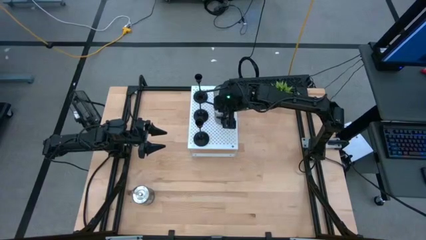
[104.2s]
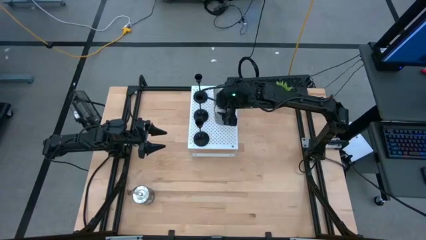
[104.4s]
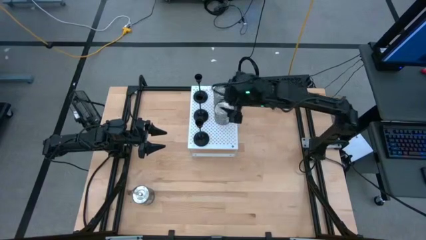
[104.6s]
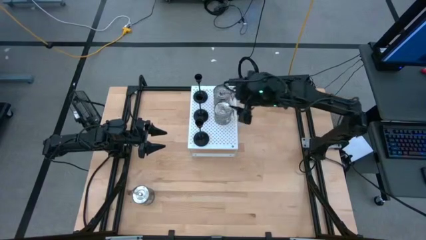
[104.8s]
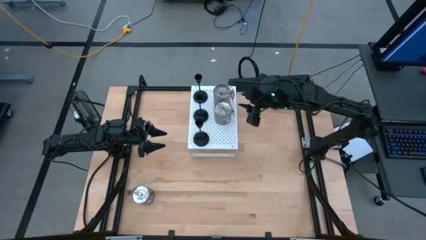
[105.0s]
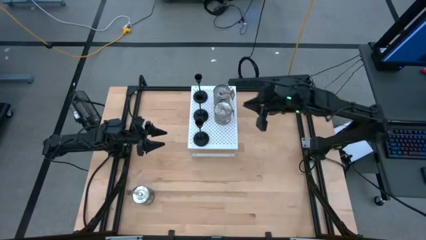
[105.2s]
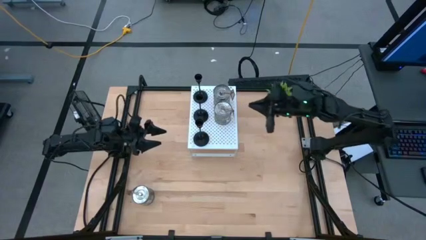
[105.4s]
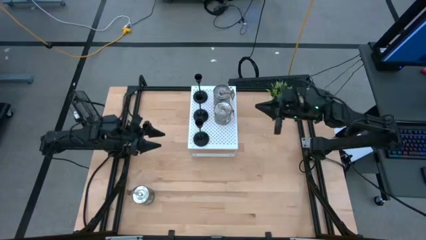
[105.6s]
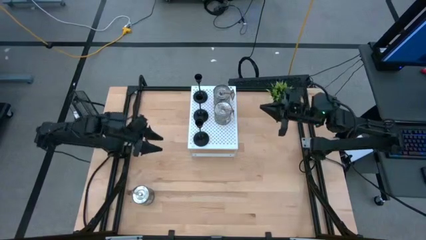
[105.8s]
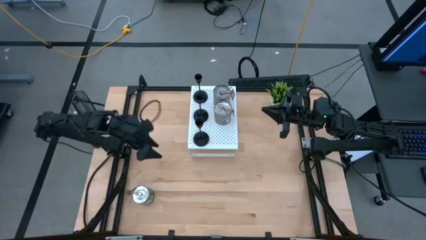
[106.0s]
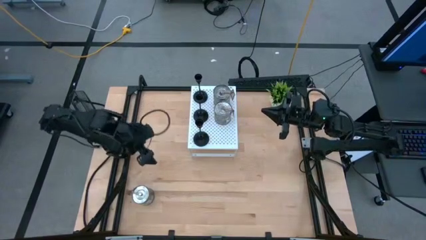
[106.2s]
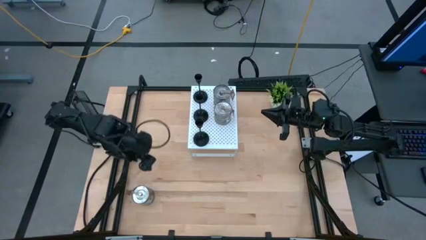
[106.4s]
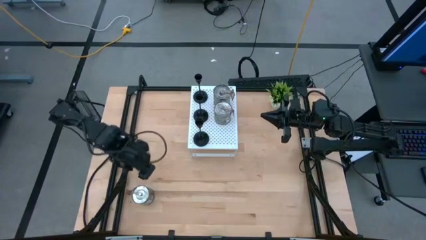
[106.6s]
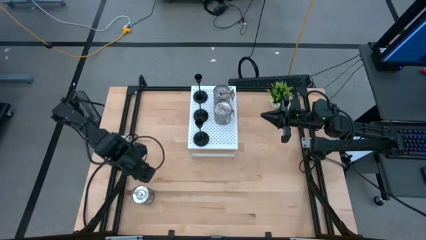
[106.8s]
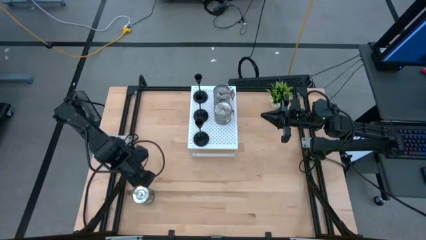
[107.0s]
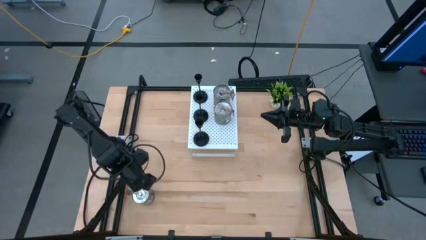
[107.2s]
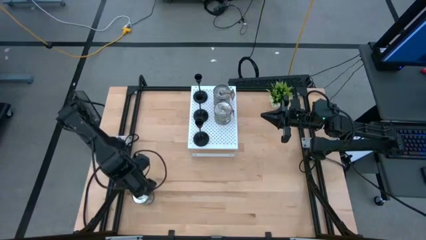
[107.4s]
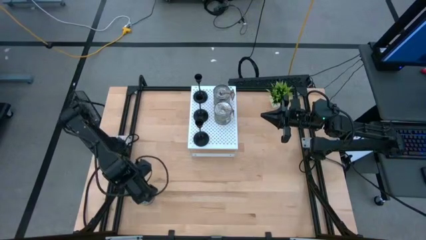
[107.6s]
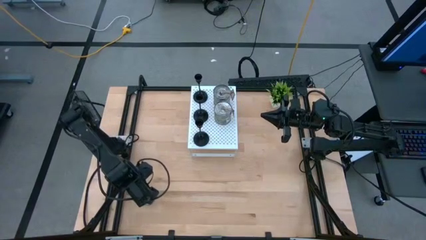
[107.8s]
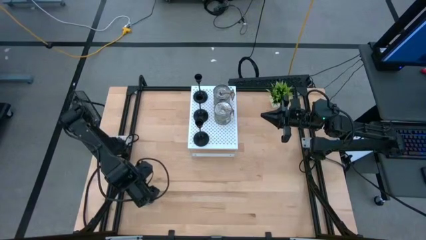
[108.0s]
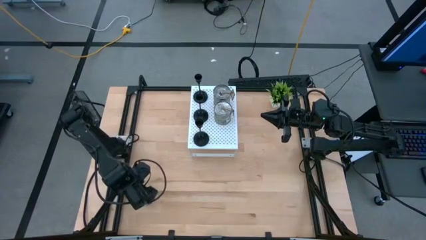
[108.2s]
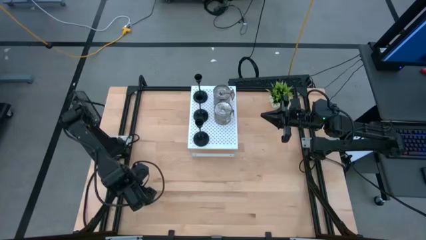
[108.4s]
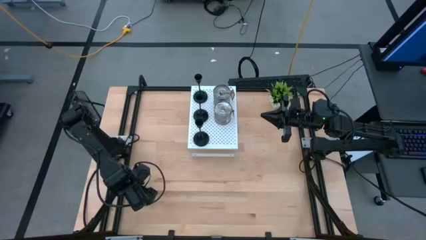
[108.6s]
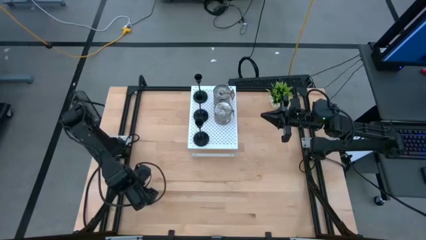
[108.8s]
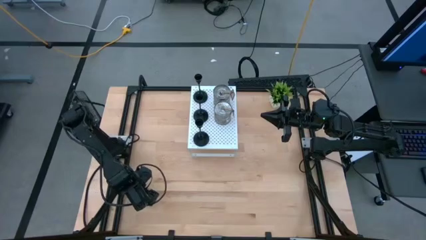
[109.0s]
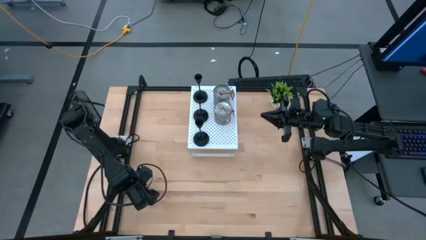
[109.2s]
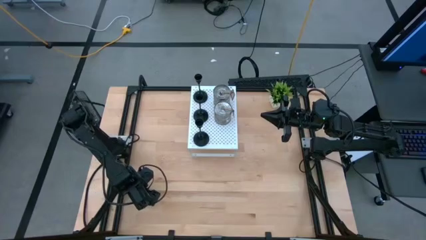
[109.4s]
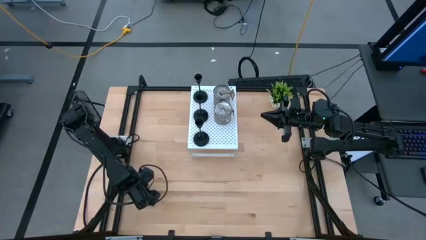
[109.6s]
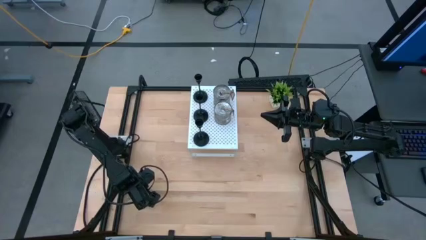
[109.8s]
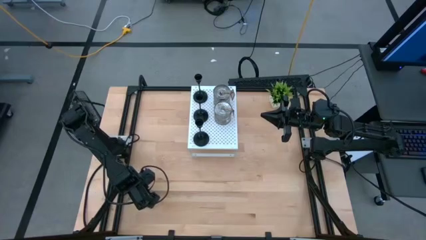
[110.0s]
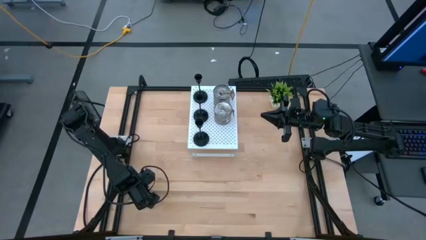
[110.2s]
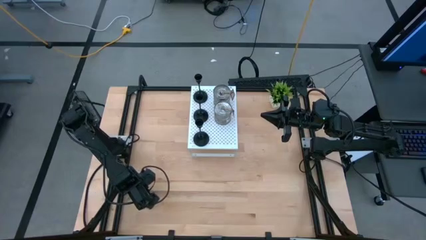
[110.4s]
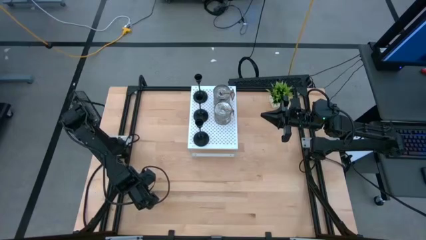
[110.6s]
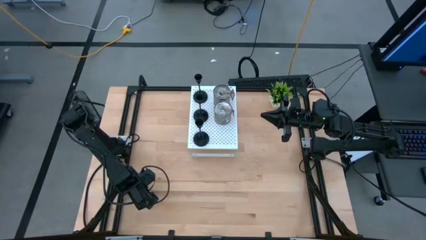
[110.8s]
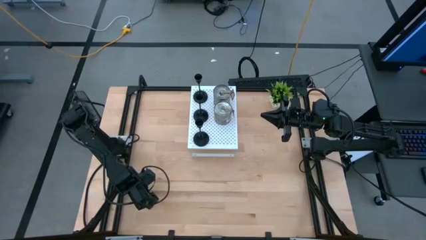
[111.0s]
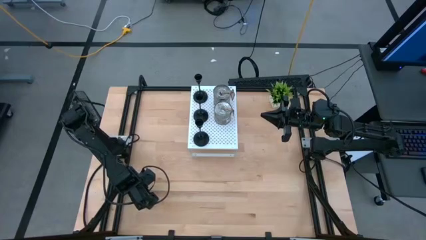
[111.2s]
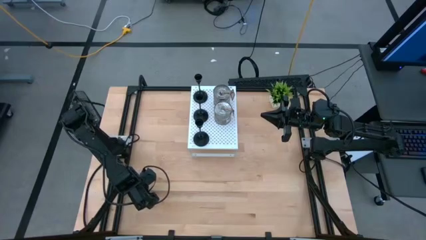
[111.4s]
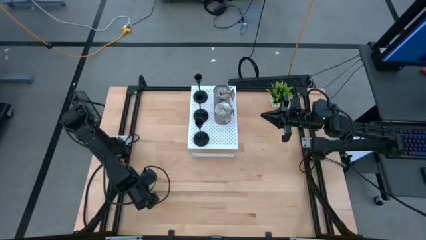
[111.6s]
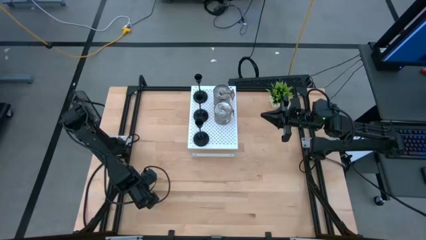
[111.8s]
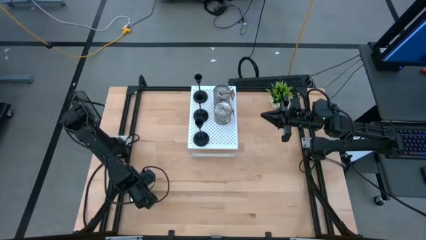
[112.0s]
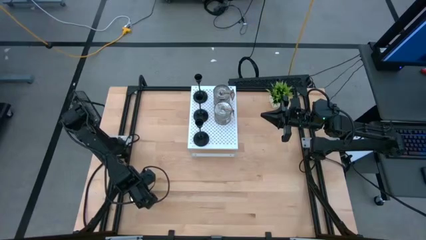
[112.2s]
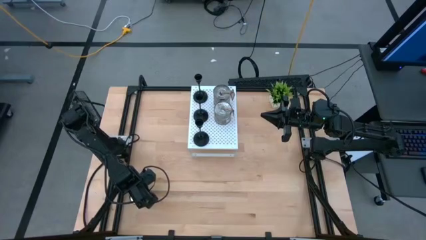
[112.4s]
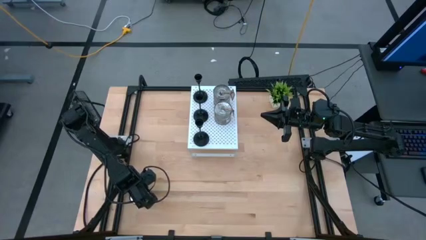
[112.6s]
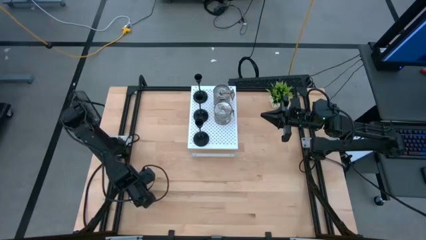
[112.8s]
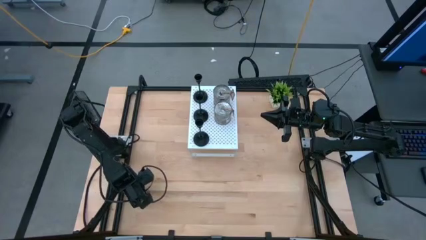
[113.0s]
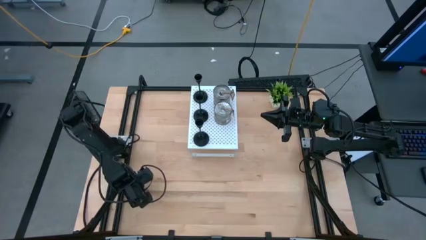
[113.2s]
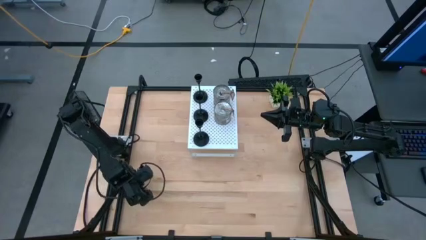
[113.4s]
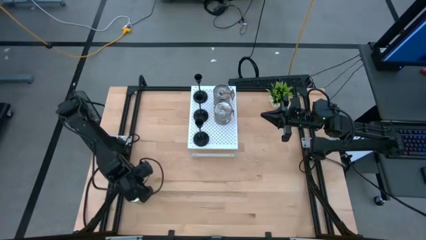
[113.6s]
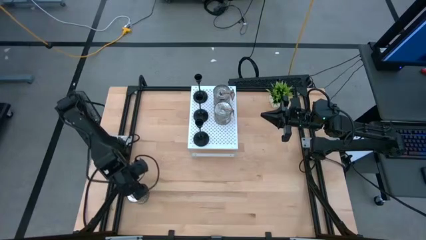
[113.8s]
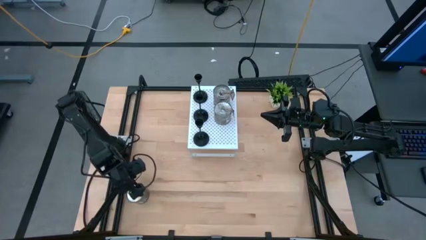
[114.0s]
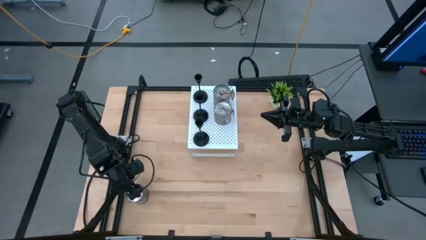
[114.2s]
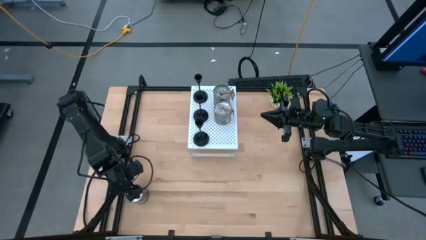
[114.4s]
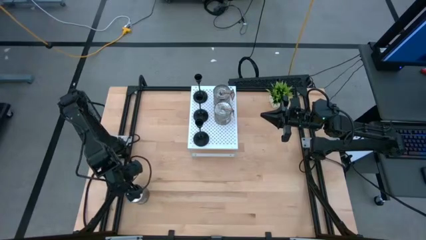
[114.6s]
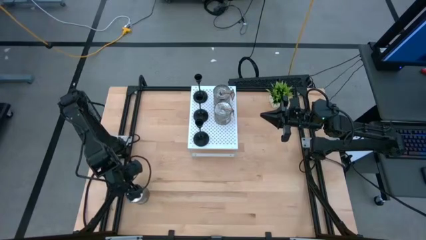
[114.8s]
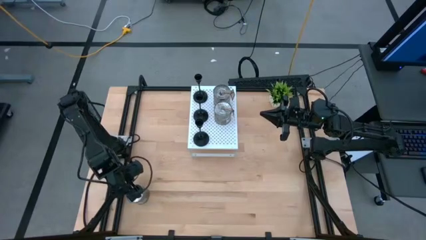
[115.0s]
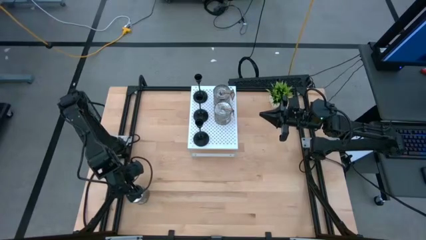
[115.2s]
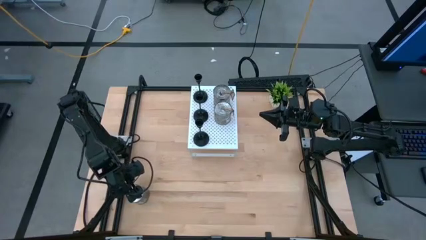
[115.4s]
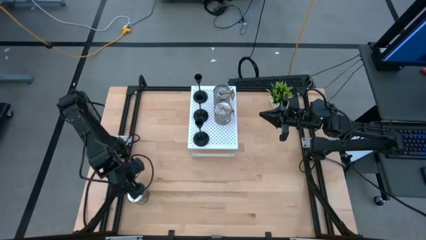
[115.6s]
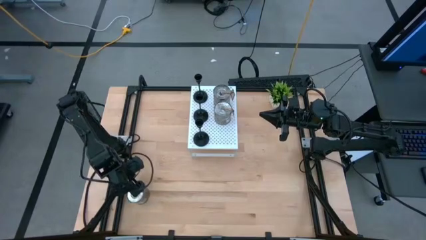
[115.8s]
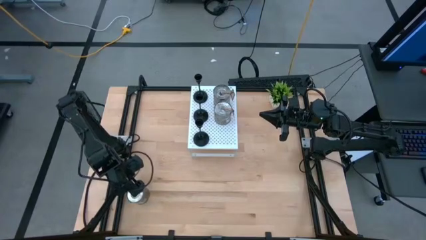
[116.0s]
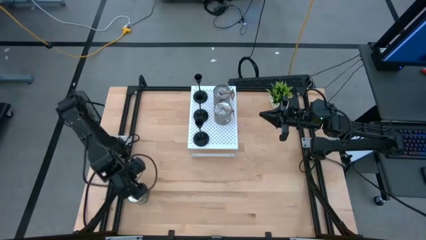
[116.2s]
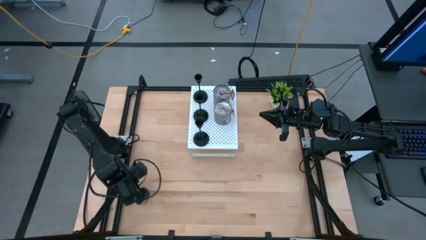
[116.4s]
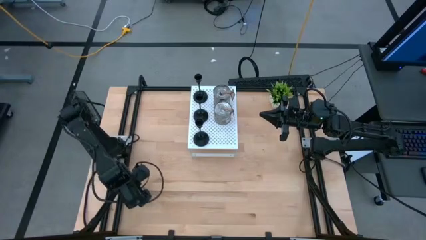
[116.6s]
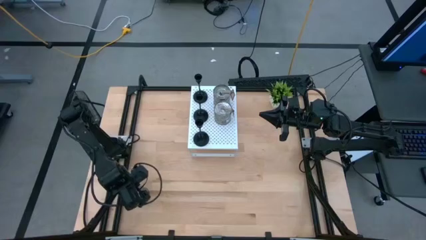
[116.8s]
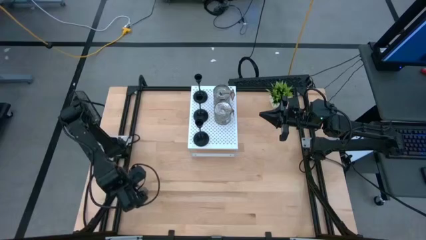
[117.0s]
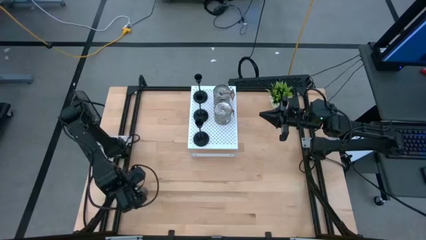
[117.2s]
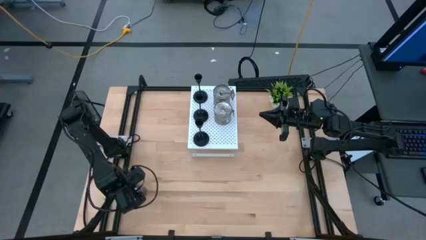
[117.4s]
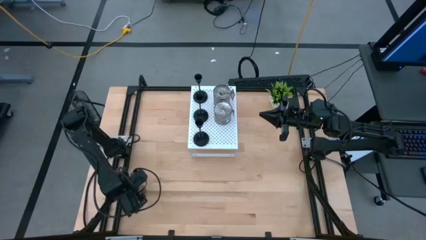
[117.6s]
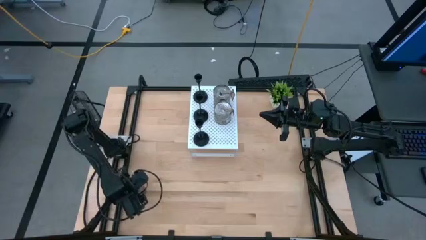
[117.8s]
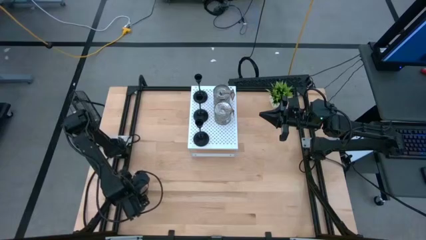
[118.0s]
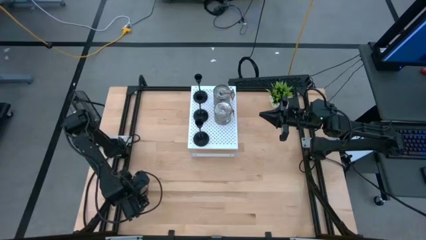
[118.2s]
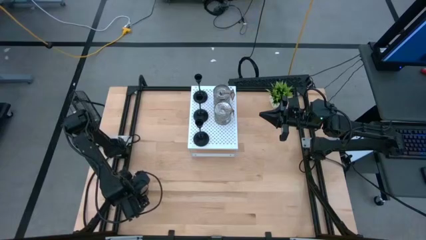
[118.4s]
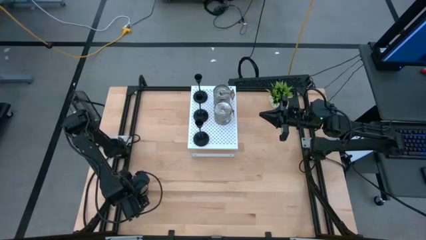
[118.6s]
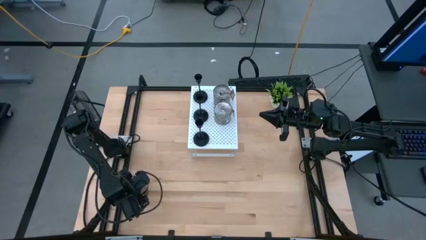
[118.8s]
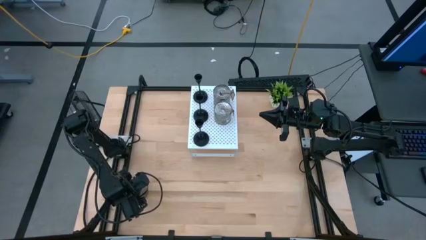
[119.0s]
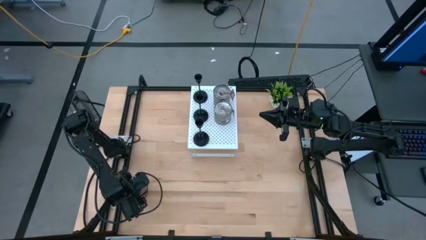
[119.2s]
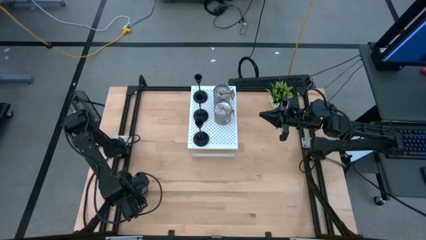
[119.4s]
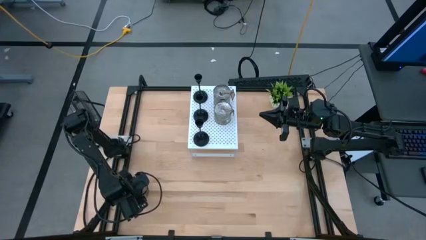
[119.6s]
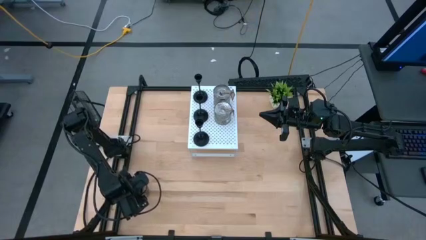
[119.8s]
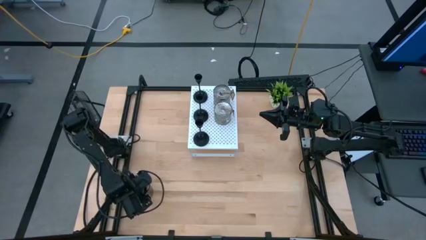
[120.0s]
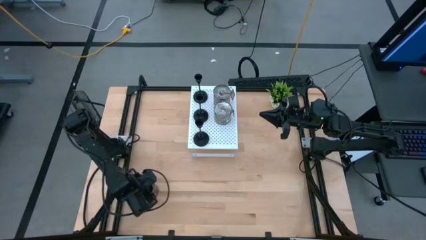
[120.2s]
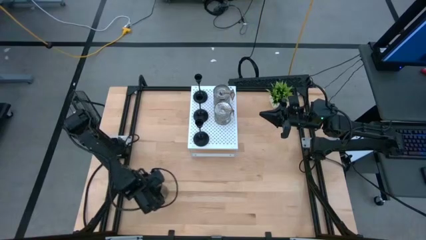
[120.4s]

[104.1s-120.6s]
Task: Pick & Place candle stick holders
Put the silver scented candle on the shelf aligned with the other silver scented candle
